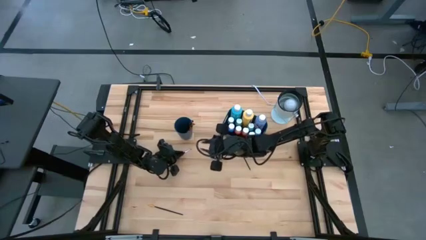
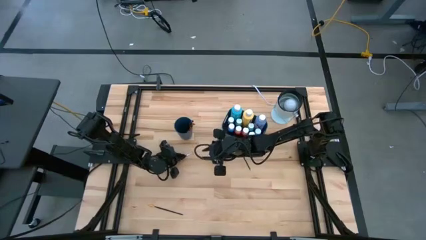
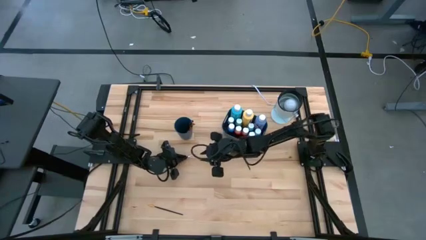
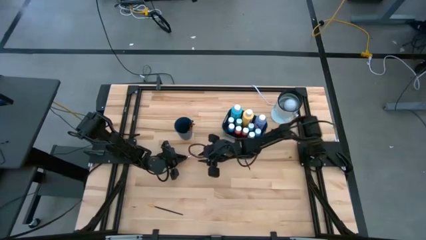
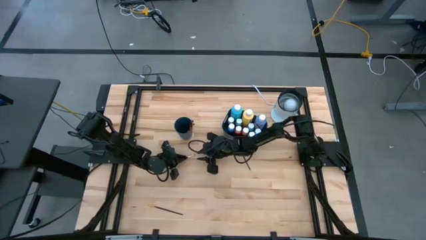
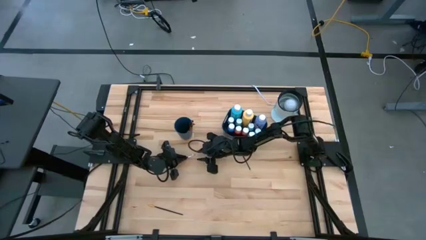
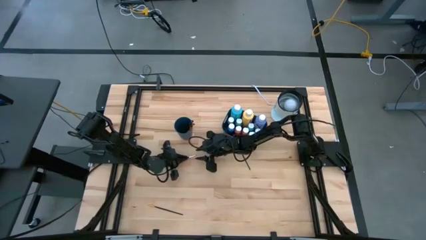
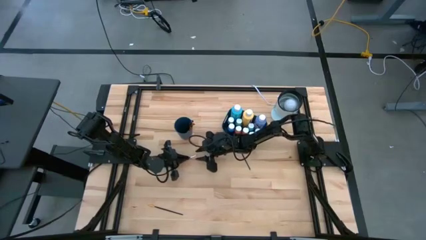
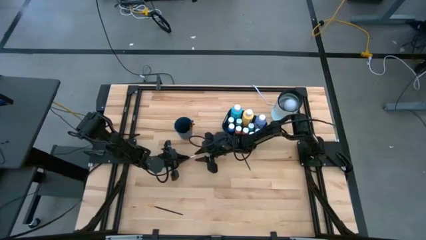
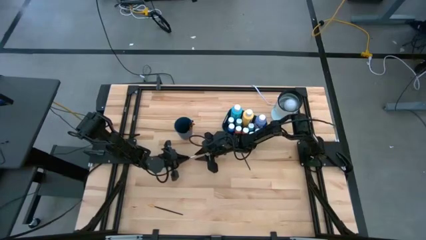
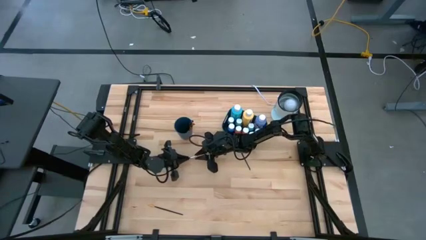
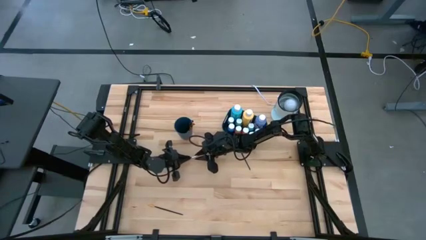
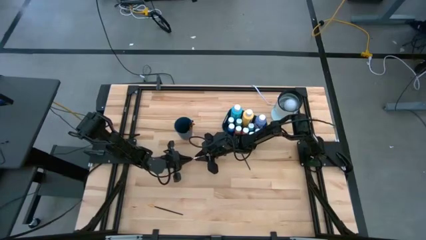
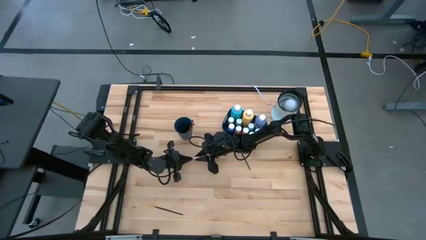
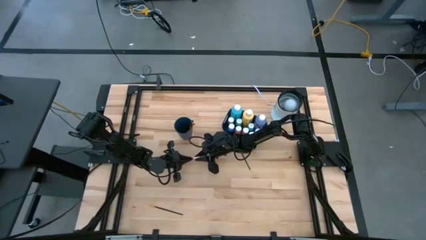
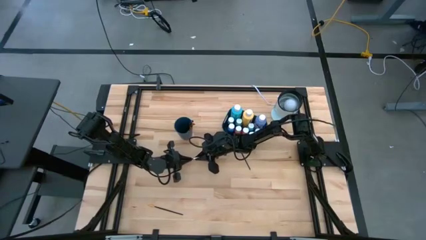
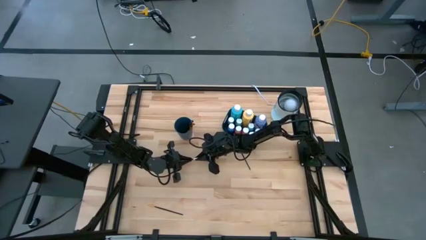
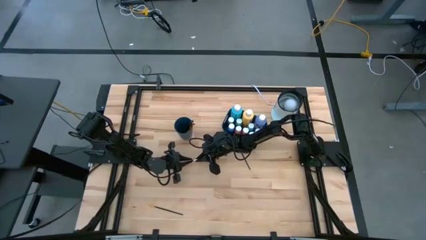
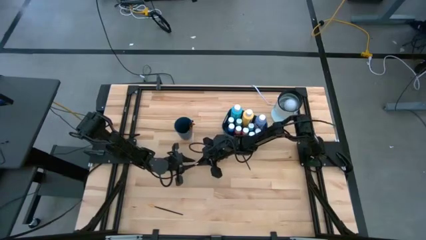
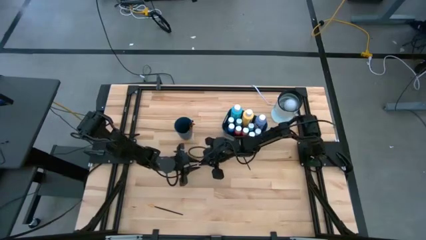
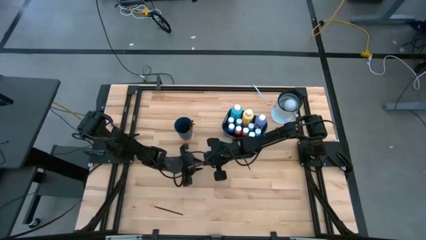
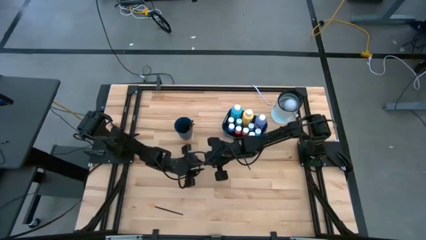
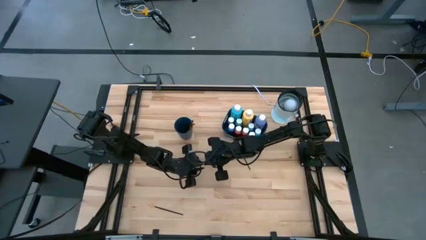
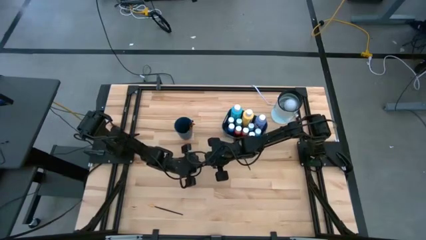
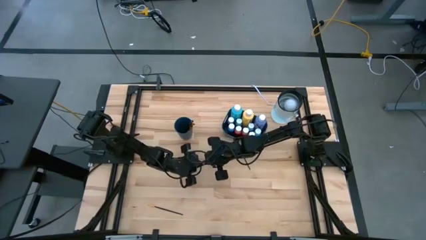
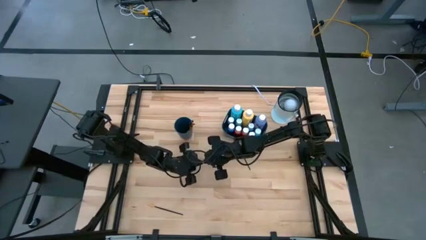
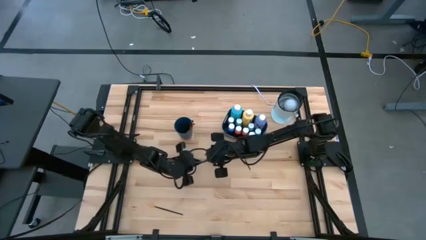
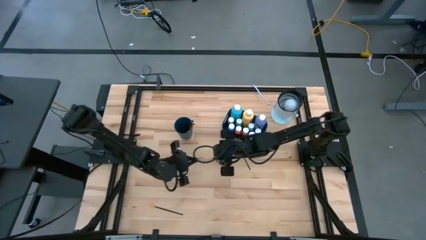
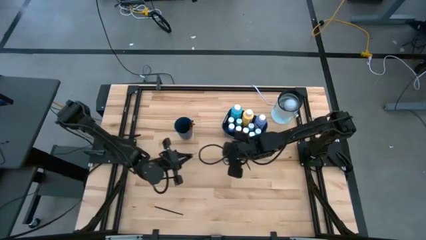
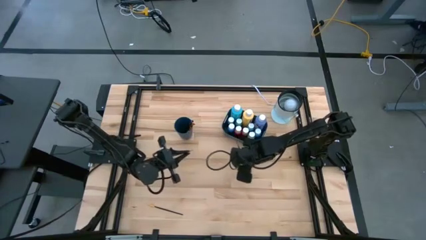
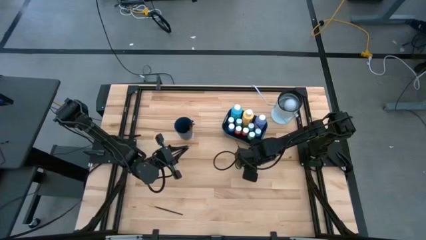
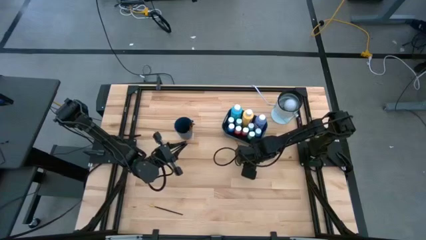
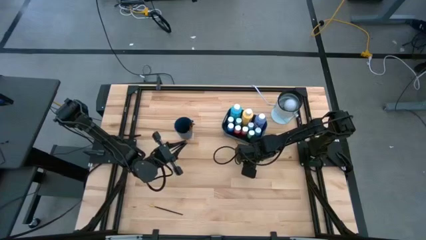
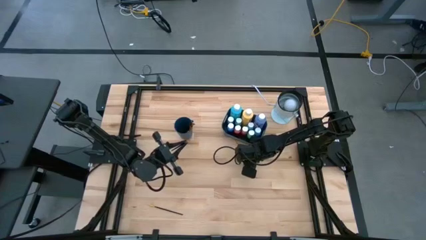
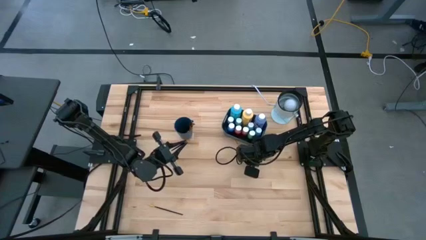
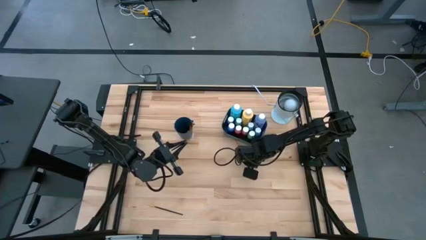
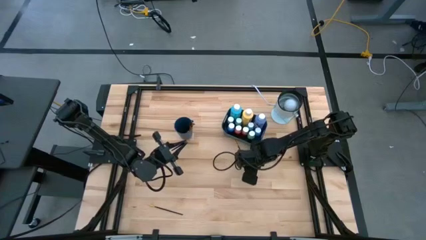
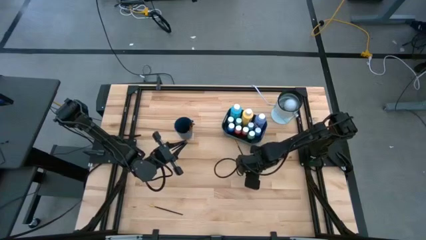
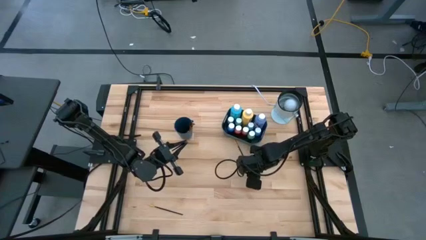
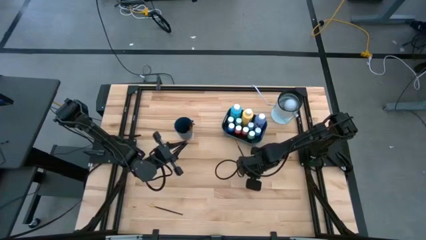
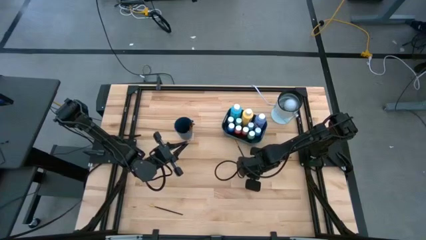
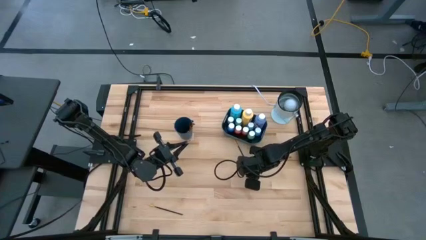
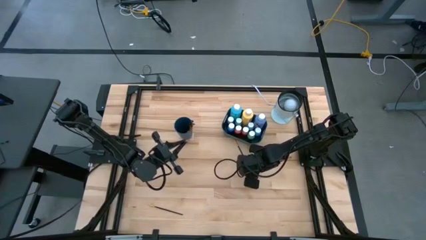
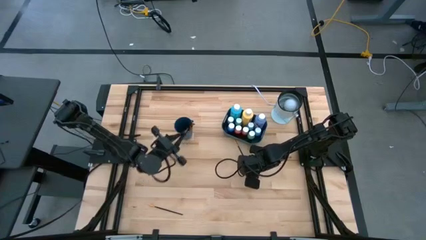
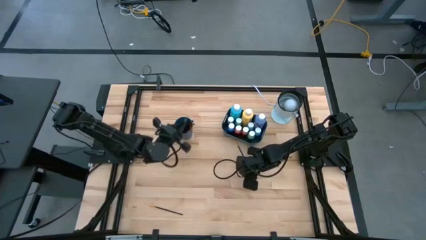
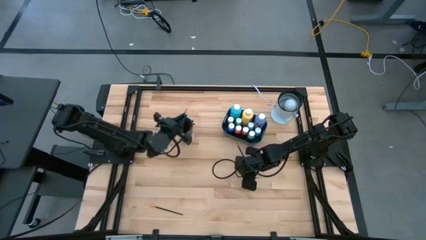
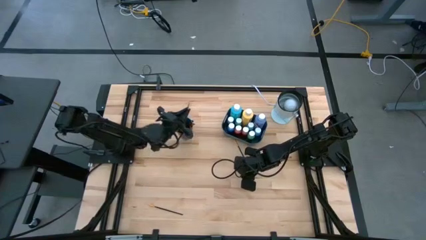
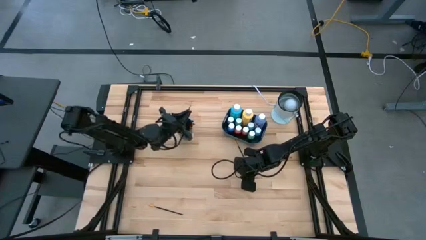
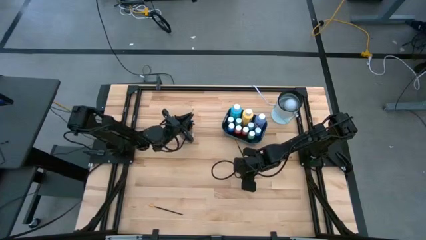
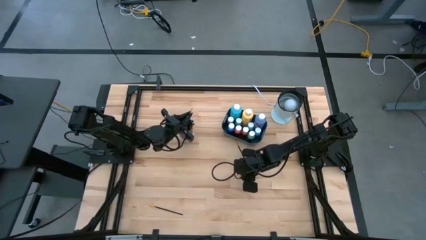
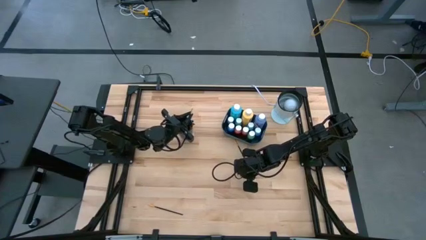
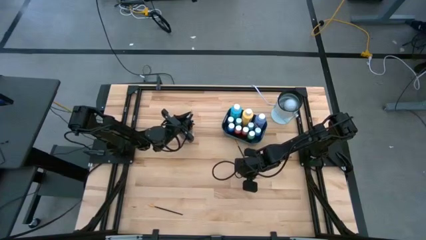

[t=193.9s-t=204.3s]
Task: Pick & Place Paint Supplies
Put the silver paintbrush into the blue cup

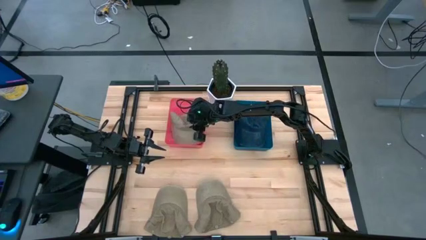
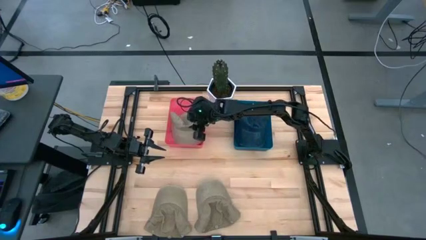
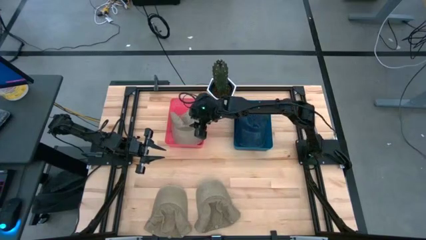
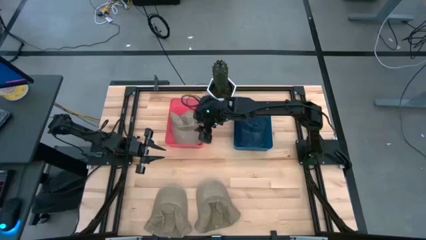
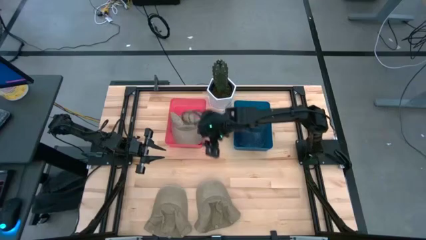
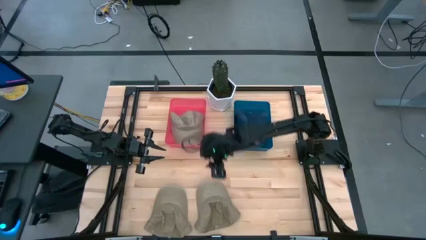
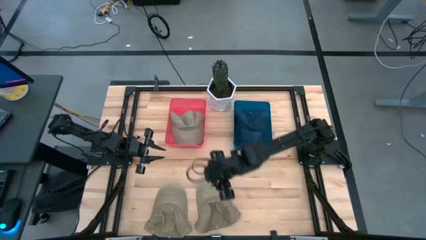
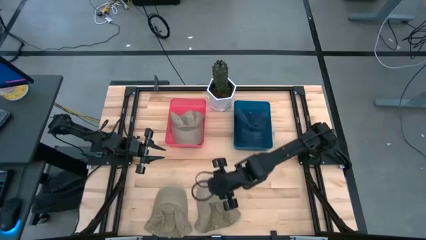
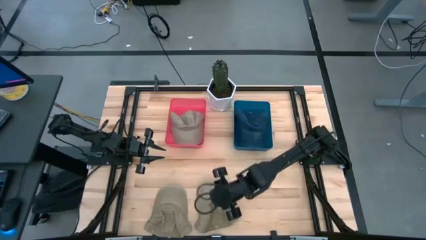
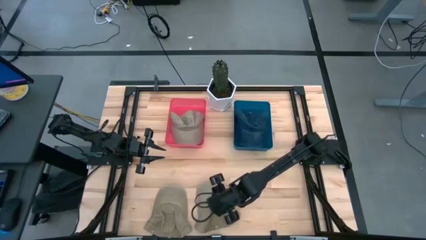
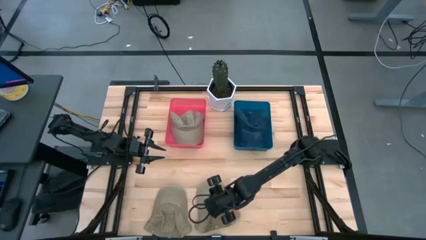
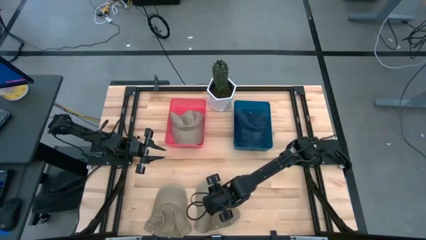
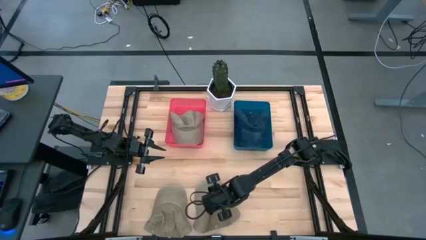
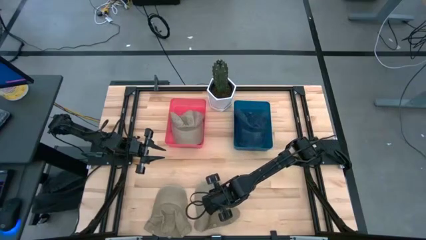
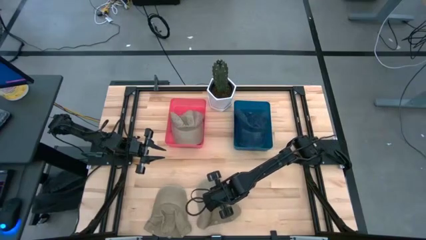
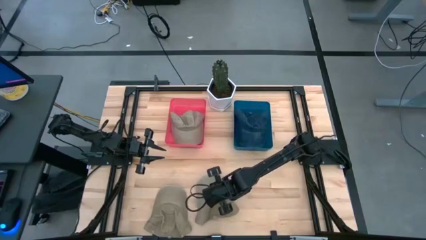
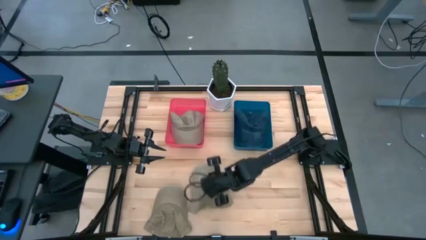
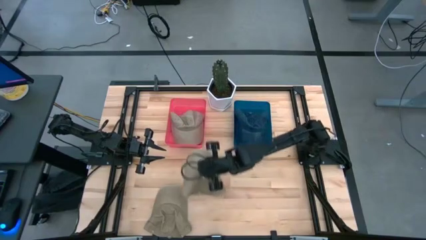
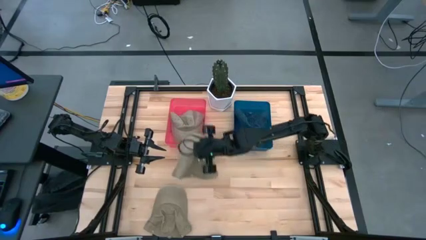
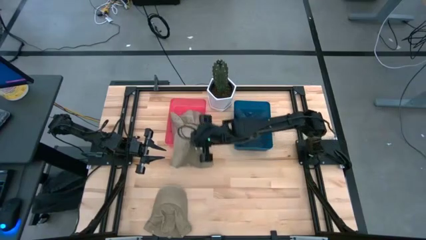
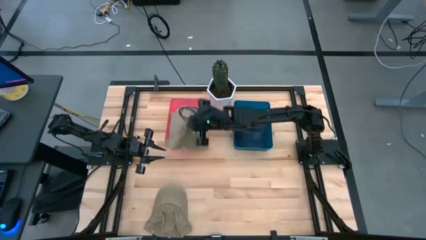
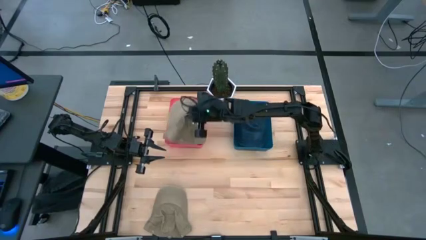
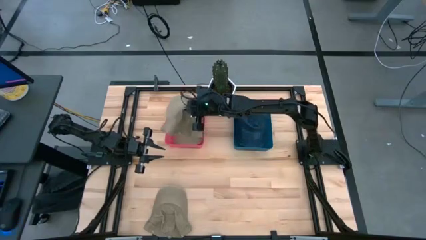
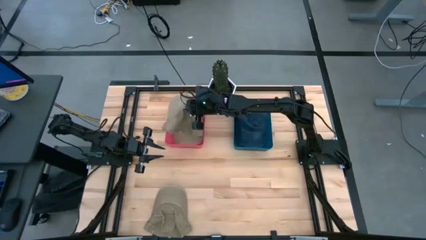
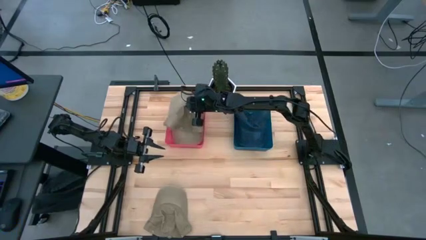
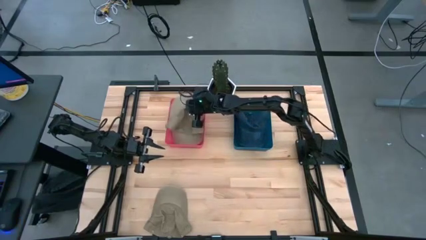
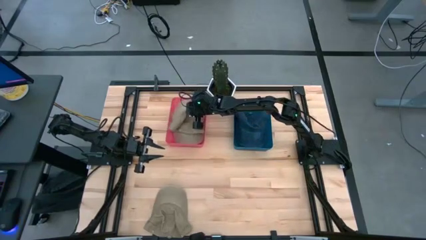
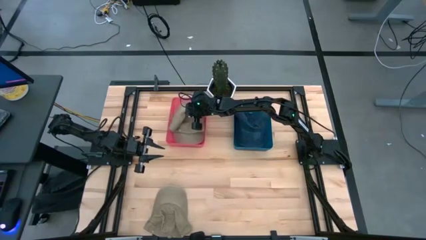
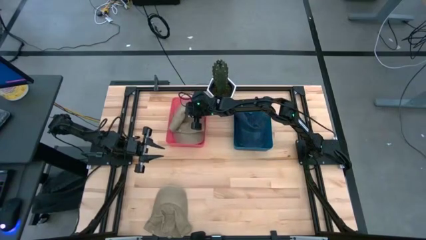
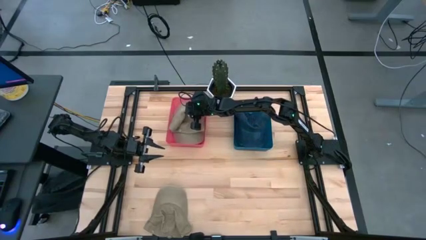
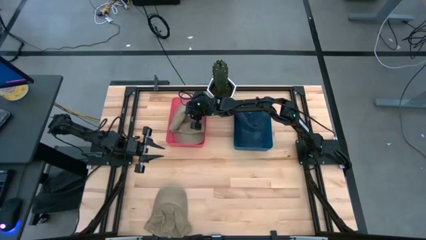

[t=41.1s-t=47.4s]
Task: Pick & Place hat
Put the right brown cap into the red bin
